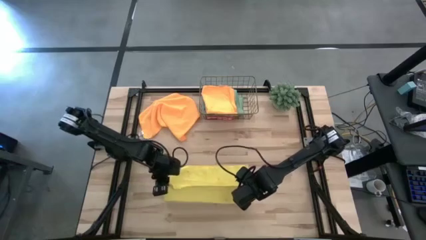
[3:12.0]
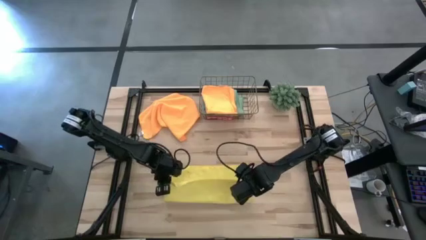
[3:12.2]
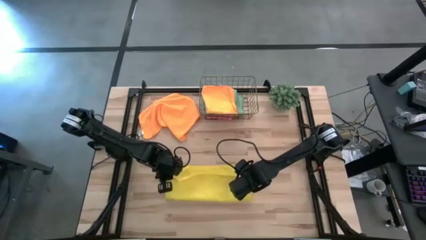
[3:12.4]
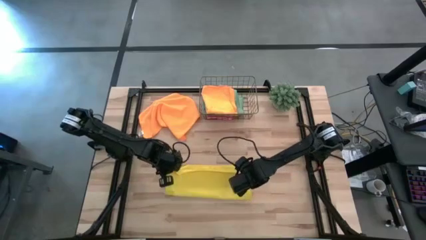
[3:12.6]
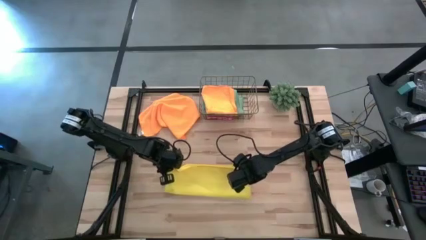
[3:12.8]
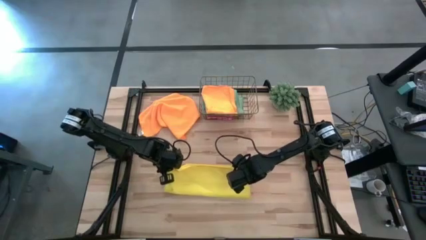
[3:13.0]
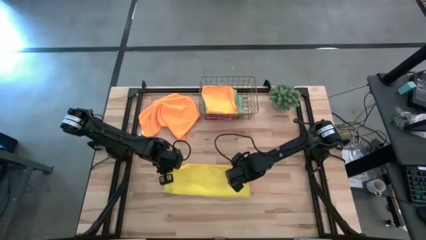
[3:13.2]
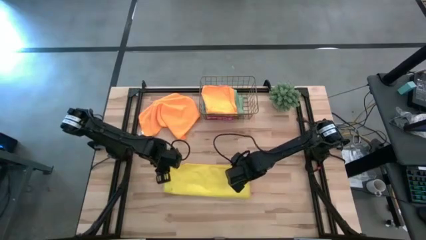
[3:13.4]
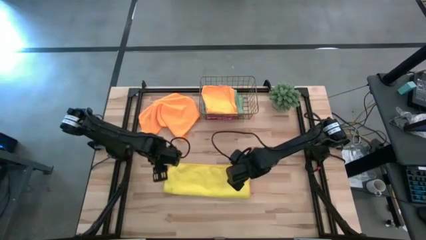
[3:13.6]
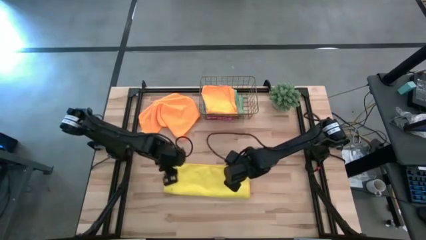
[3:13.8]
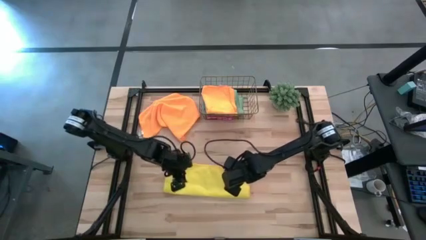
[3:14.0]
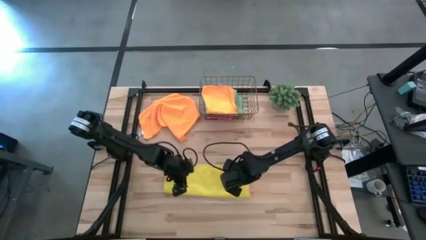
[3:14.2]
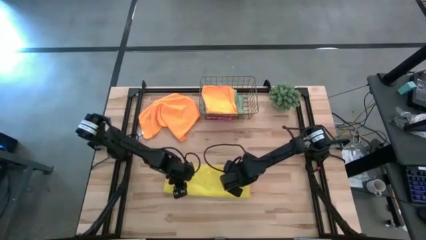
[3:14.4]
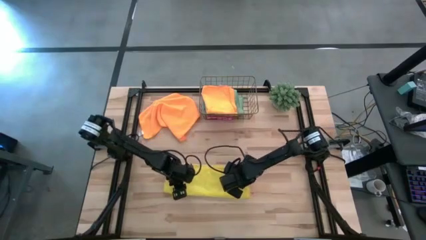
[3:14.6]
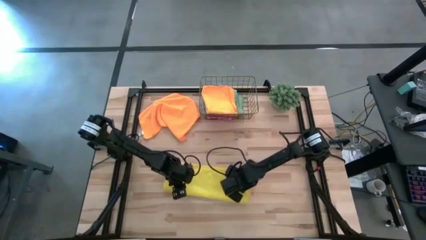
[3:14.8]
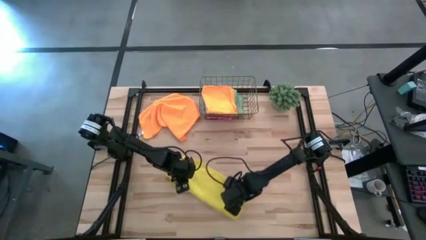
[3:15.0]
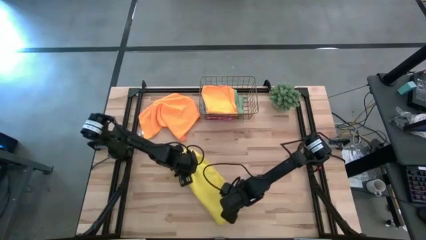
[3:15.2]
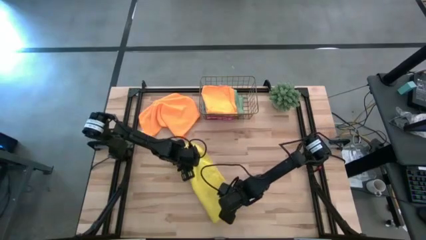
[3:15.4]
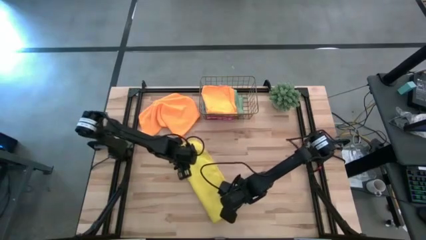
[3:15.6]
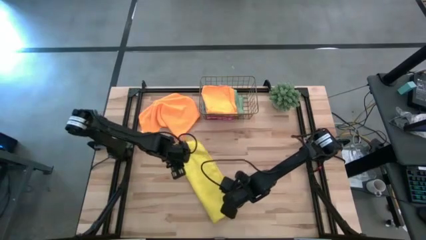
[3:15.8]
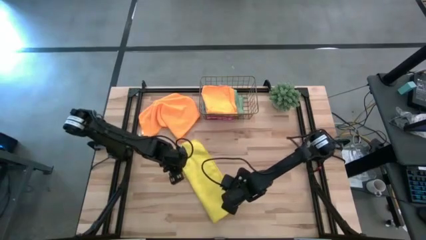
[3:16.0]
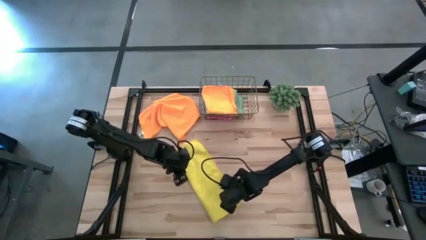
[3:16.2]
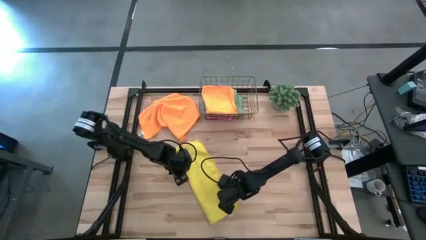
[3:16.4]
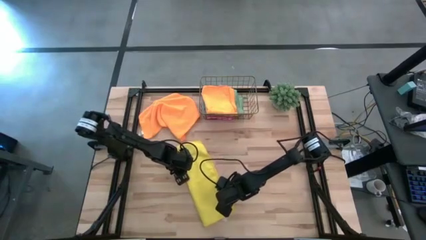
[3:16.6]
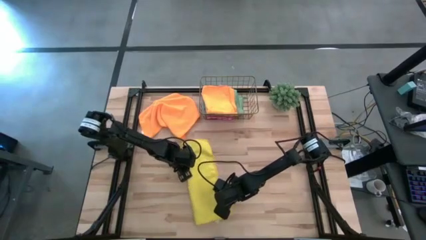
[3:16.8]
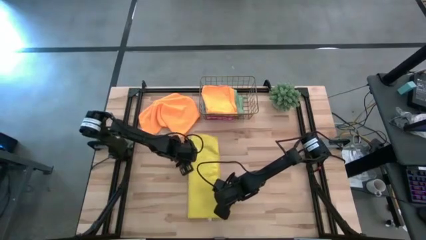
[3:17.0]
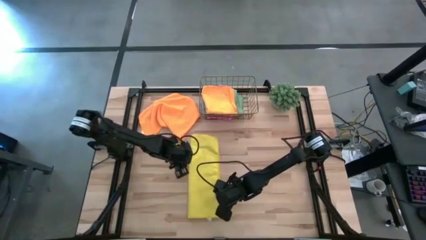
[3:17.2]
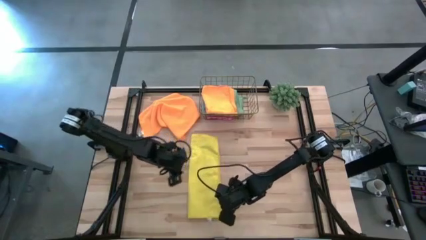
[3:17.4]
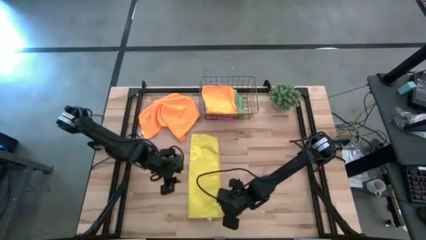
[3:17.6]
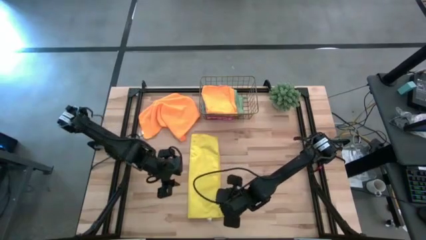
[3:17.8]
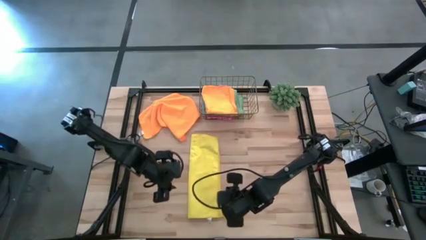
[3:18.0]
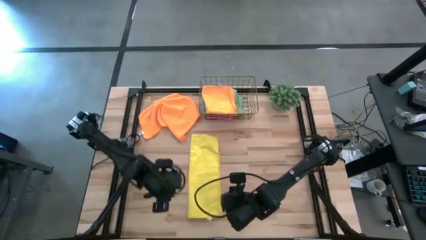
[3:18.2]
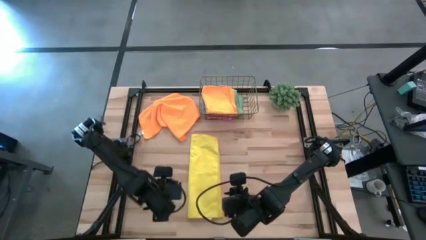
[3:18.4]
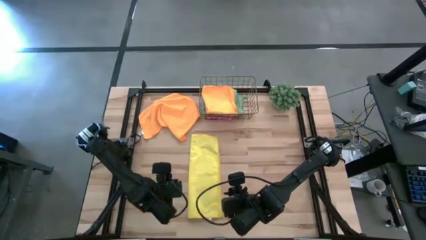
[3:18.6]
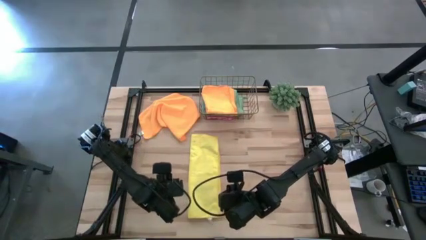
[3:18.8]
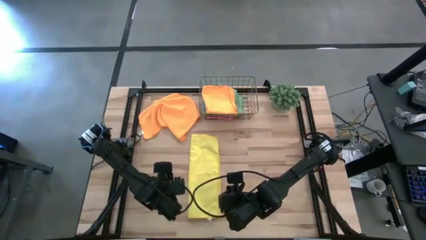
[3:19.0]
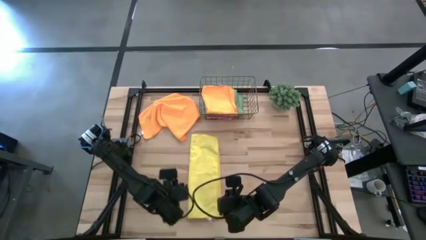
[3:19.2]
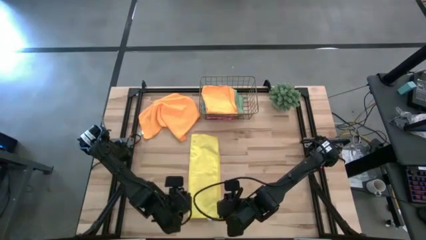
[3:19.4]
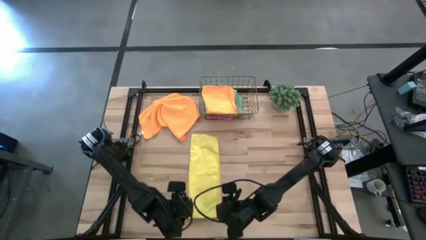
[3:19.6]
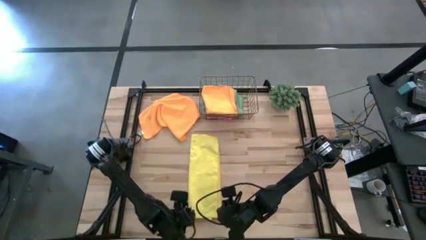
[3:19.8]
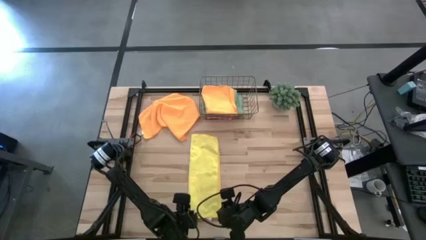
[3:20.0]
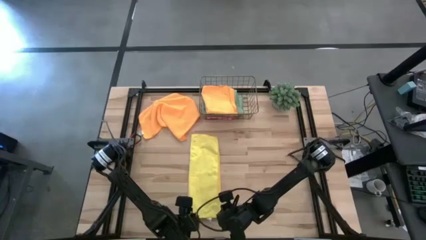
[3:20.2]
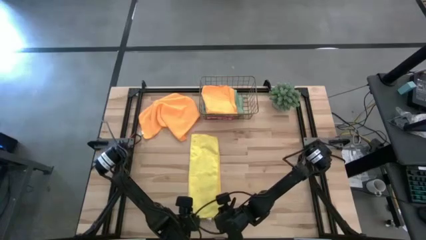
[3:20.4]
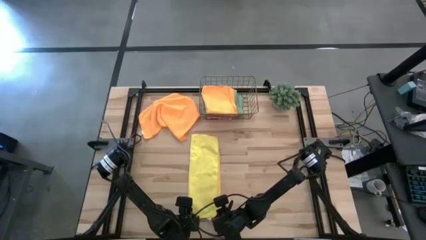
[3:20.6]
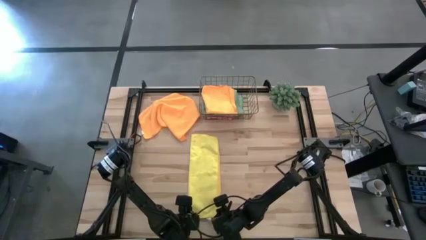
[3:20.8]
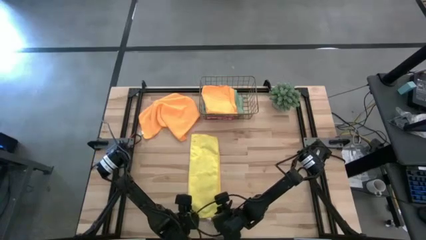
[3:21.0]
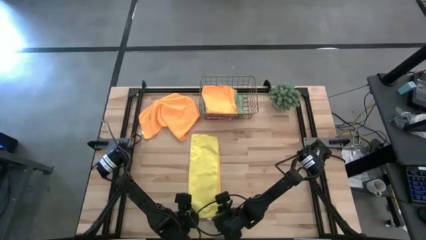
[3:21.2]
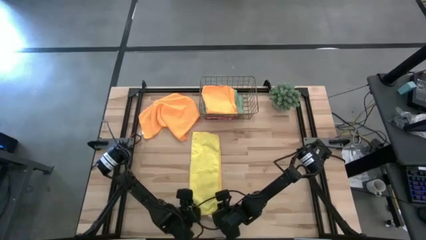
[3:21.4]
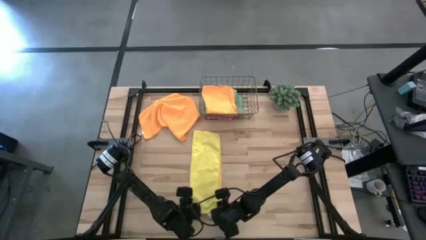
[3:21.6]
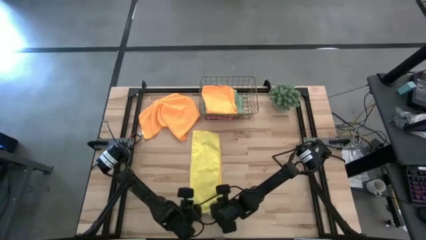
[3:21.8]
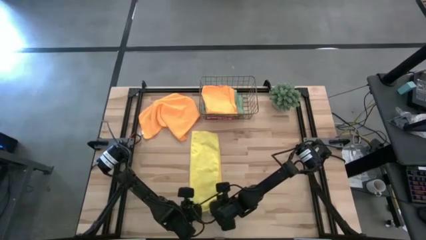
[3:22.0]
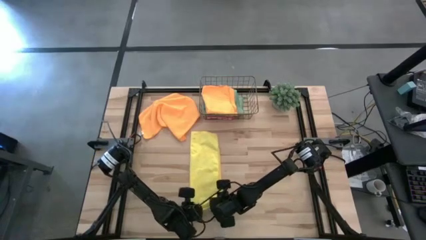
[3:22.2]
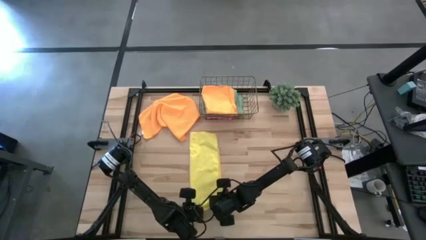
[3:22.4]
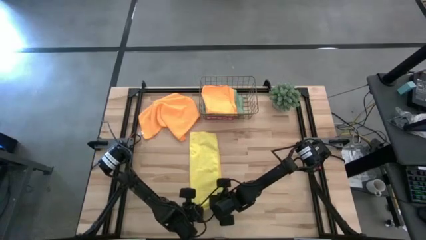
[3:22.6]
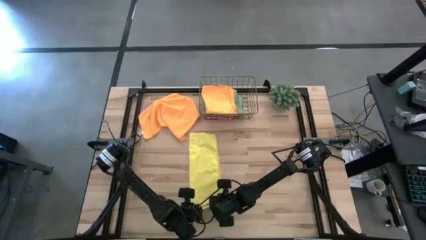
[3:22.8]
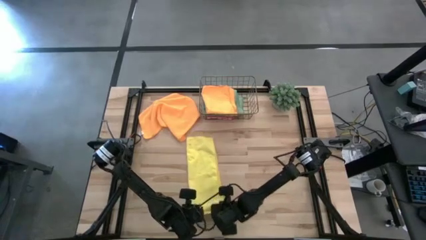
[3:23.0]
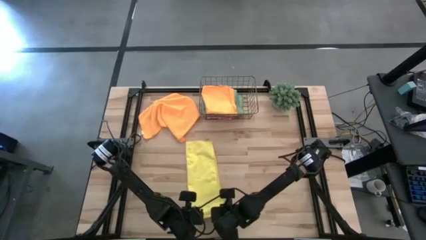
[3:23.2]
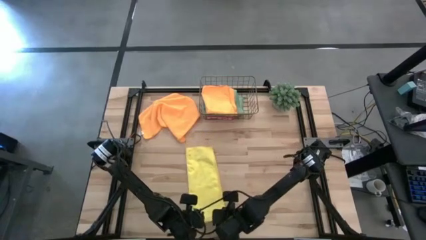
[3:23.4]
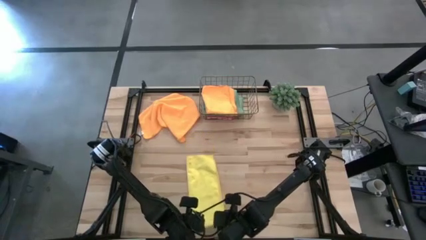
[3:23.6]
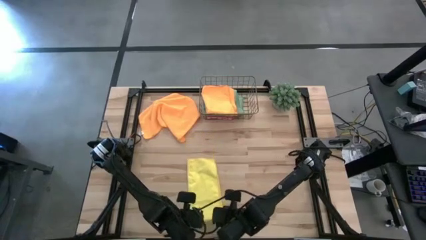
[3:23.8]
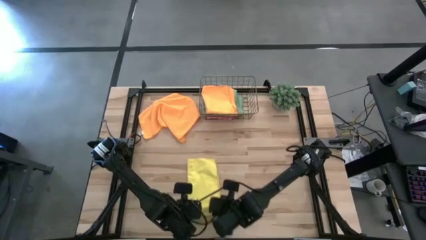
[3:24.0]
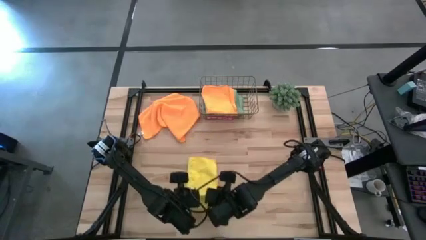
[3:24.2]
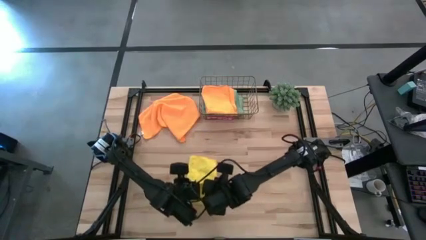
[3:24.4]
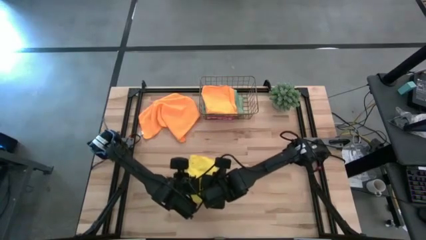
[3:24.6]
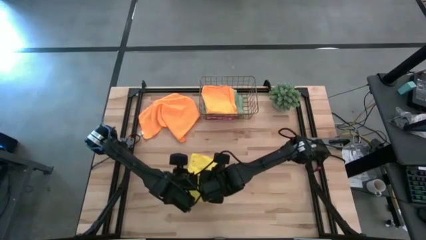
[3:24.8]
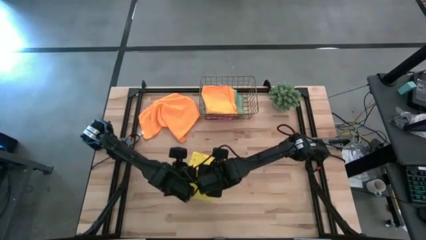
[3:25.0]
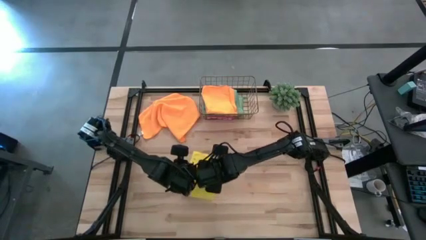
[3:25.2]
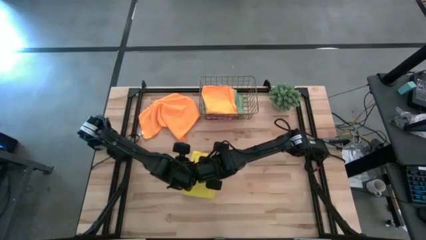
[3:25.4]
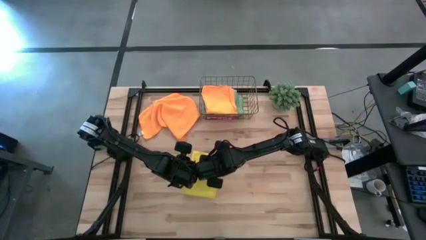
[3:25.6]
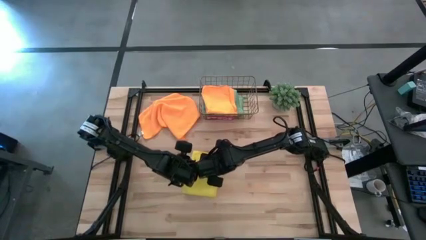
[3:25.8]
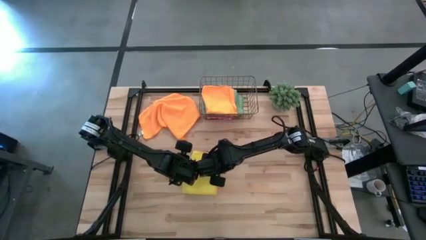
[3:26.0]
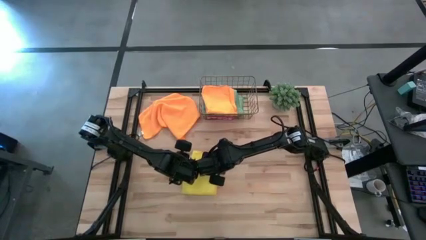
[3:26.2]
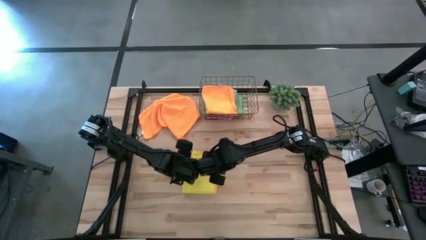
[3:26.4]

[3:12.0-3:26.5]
Task: Fold microfiber towels
Fold the yellow microfiber cloth

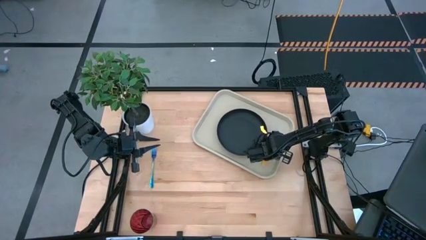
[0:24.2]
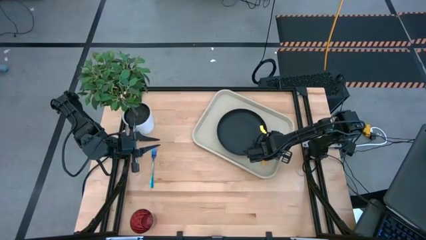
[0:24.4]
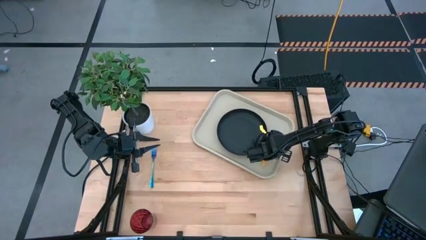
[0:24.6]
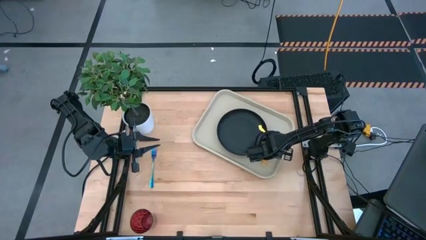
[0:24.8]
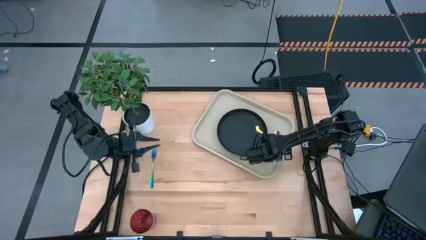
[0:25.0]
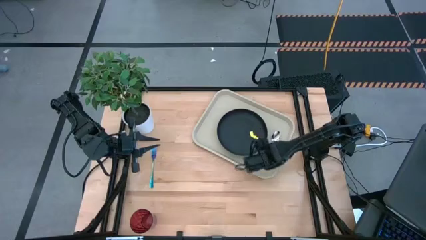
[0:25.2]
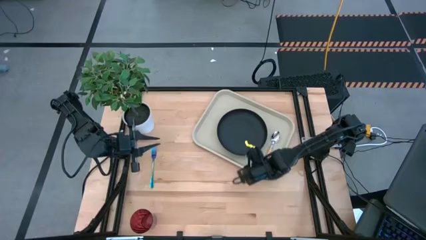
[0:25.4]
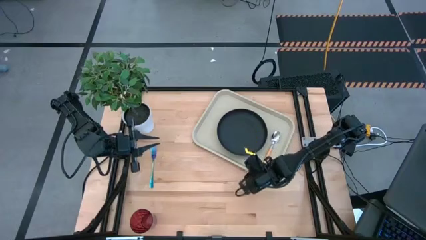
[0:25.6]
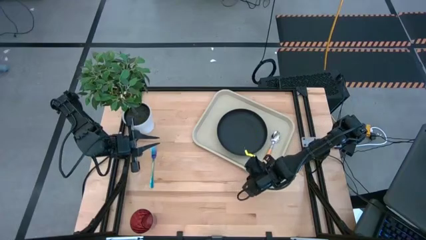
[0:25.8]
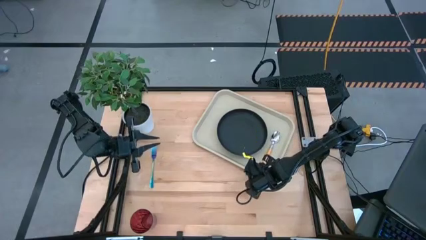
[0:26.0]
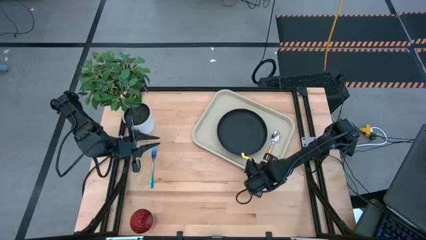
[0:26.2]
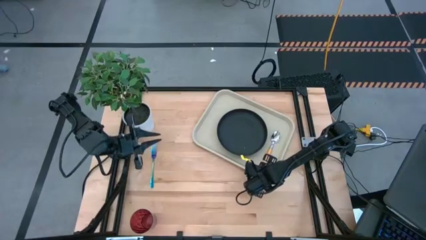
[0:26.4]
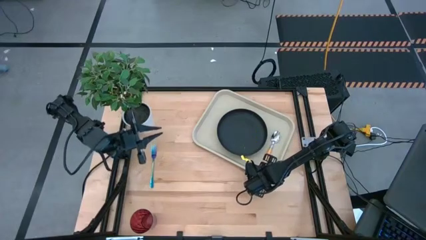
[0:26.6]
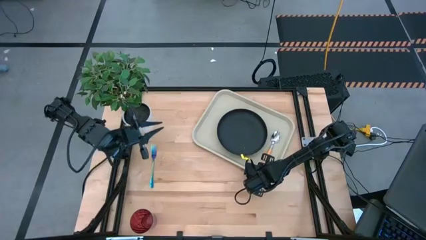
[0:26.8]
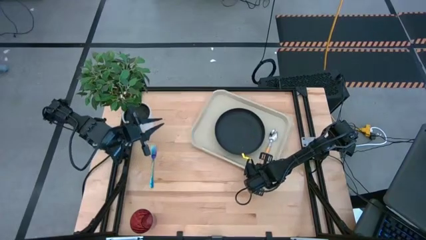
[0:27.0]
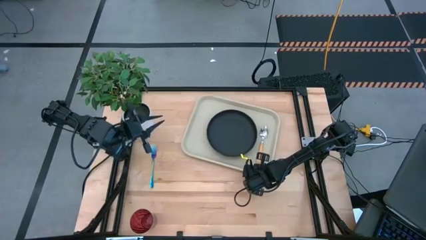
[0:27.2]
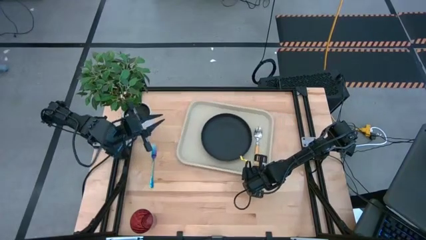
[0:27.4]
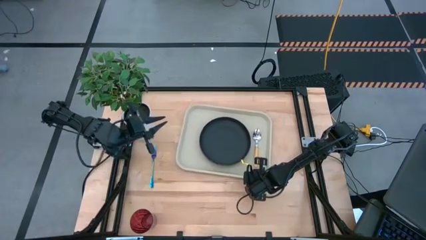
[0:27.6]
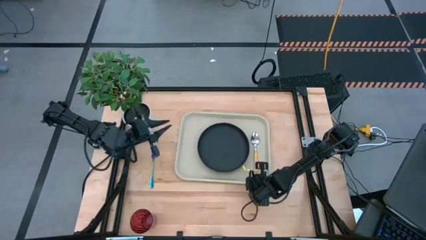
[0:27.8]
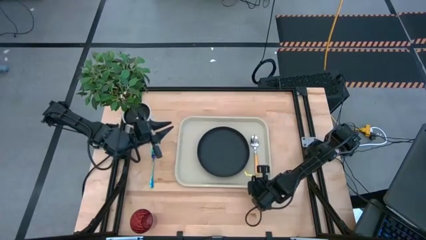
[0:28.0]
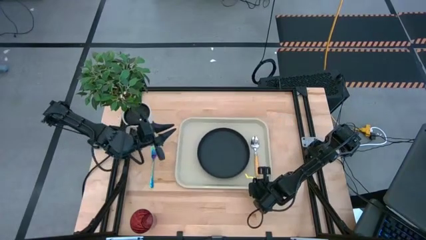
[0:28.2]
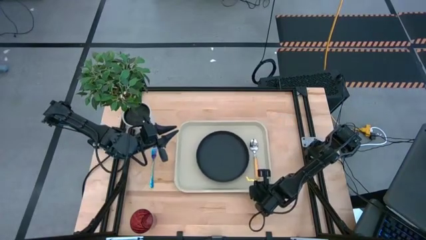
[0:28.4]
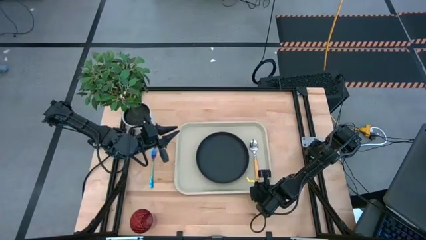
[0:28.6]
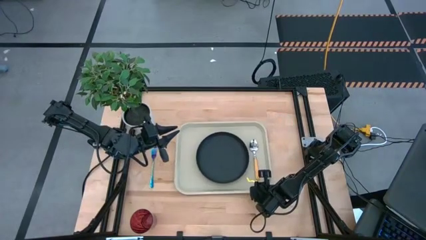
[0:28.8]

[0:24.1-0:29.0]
Task: Pick and place plate/cup/fork/spoon on tray
Move the tray to the center
